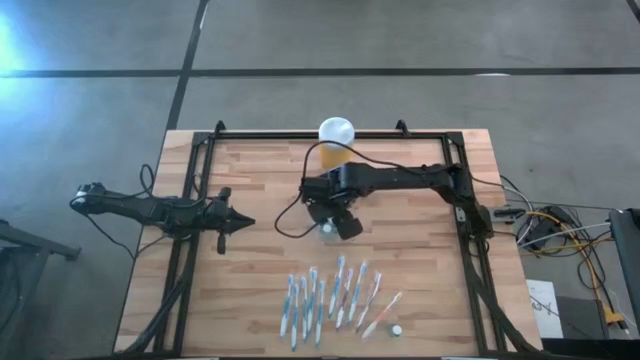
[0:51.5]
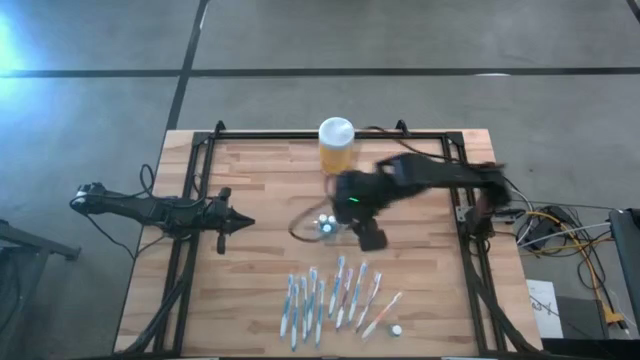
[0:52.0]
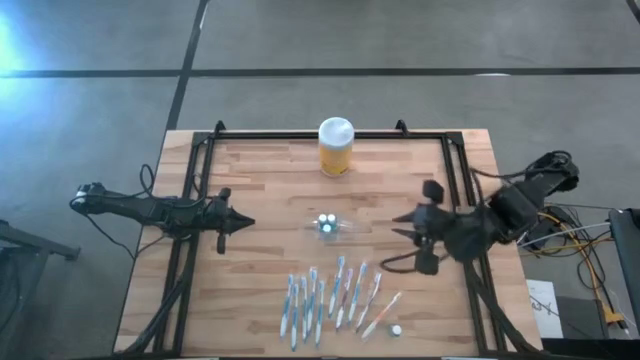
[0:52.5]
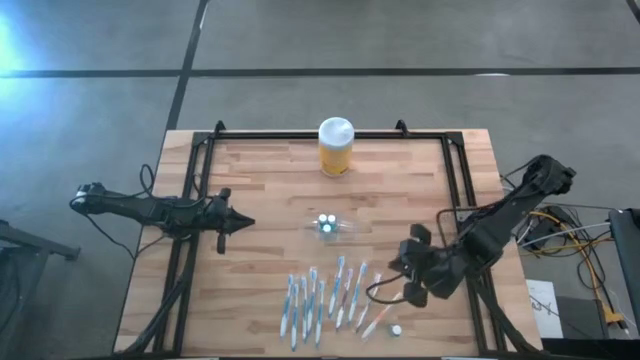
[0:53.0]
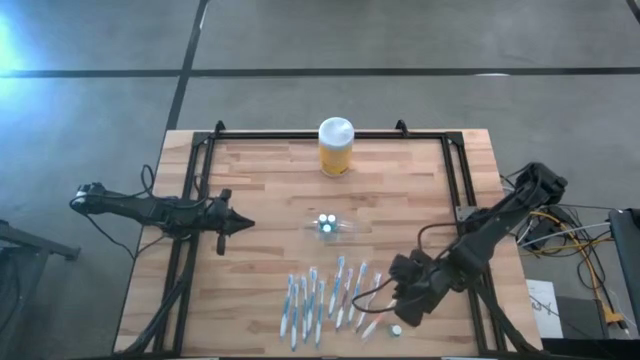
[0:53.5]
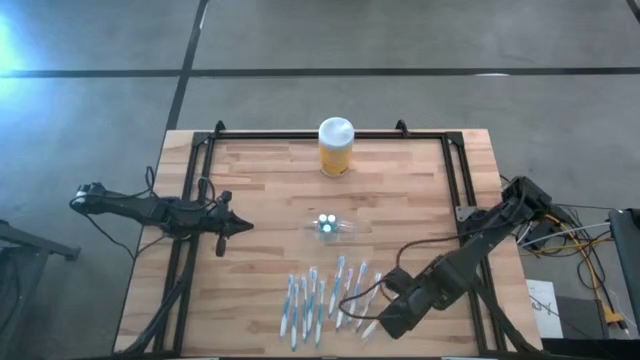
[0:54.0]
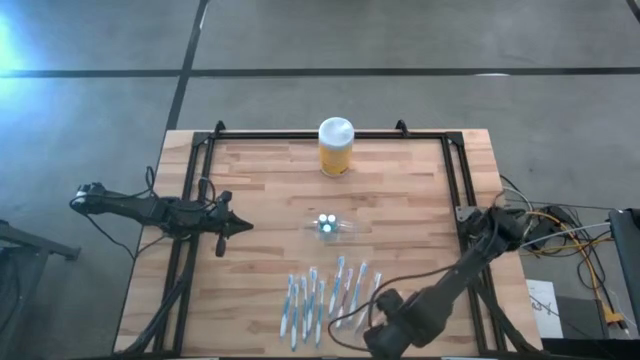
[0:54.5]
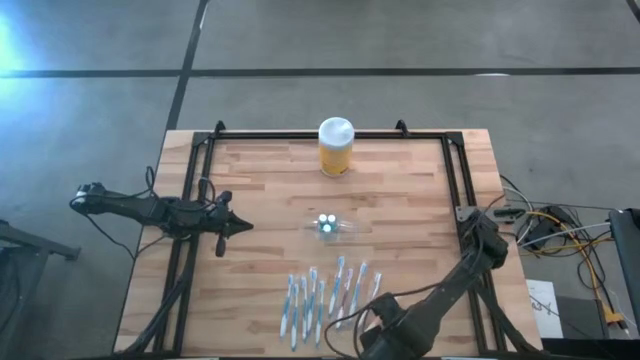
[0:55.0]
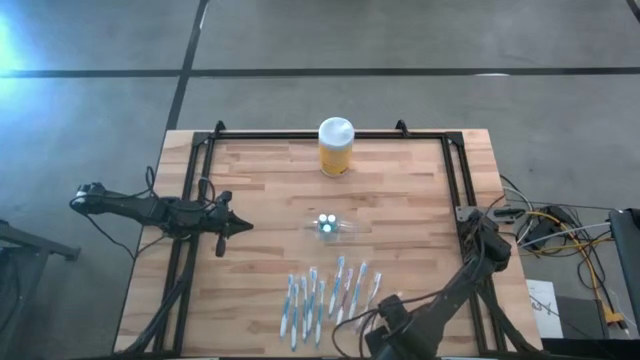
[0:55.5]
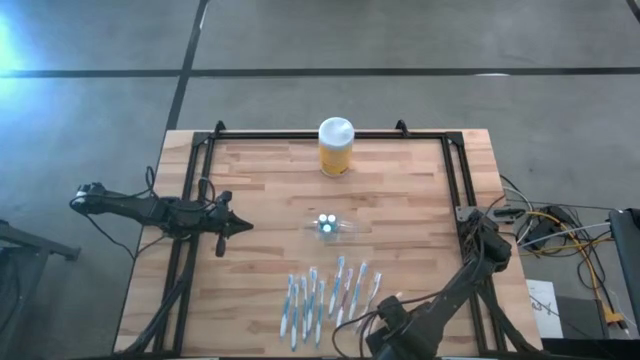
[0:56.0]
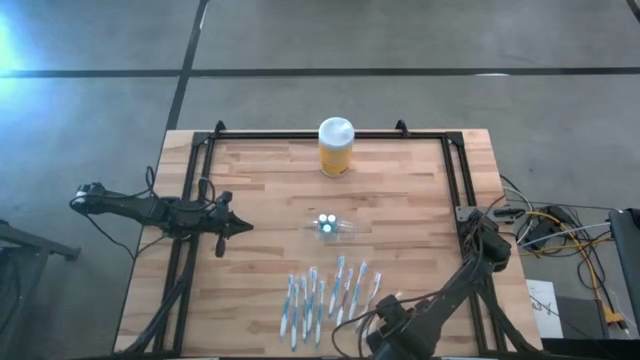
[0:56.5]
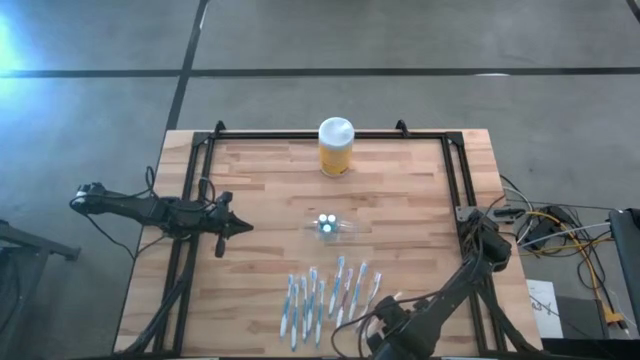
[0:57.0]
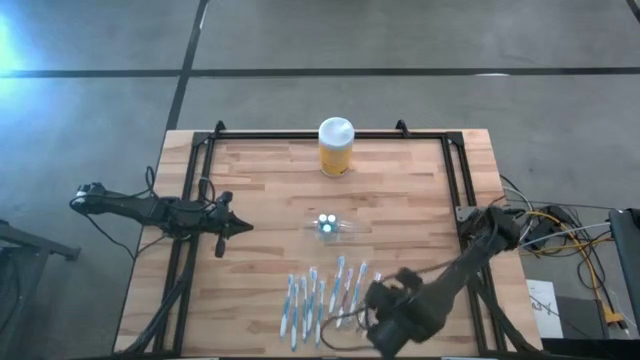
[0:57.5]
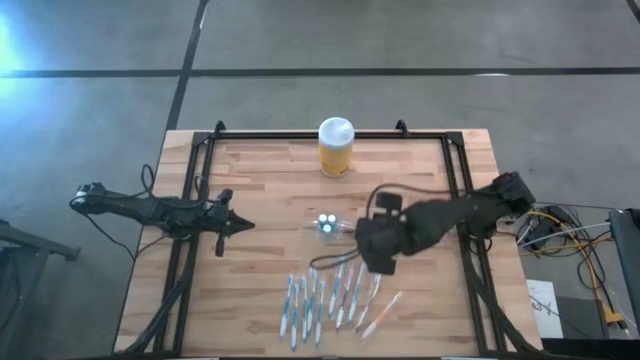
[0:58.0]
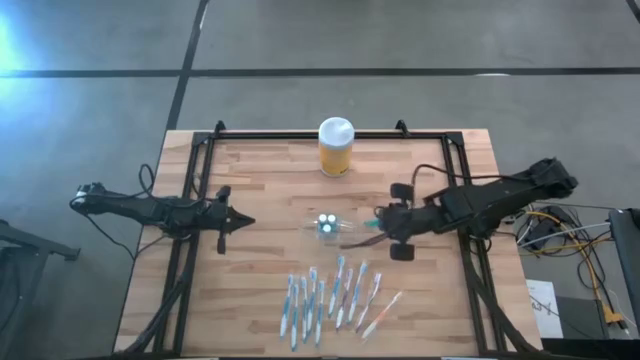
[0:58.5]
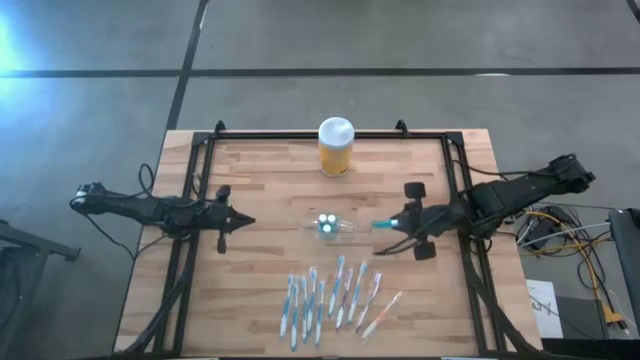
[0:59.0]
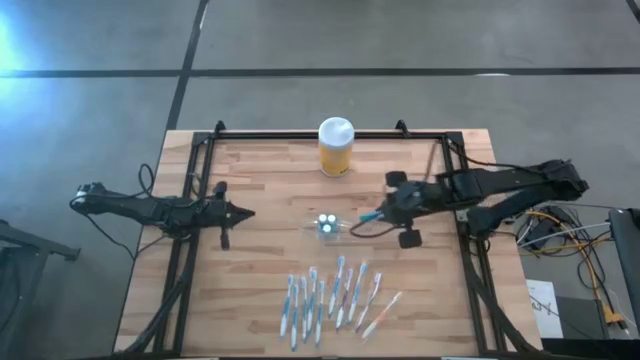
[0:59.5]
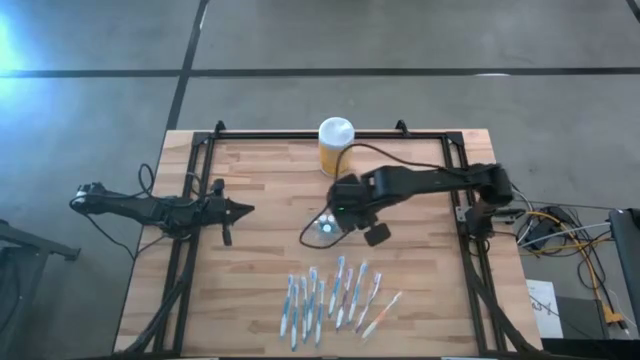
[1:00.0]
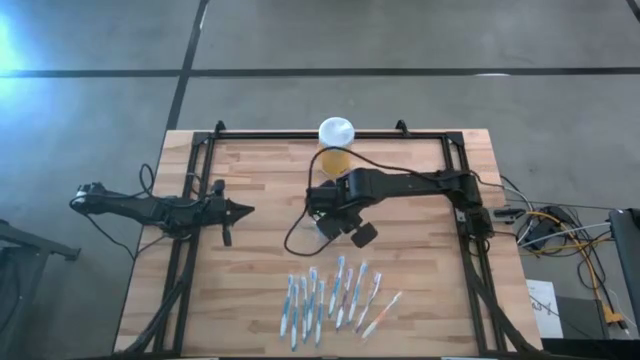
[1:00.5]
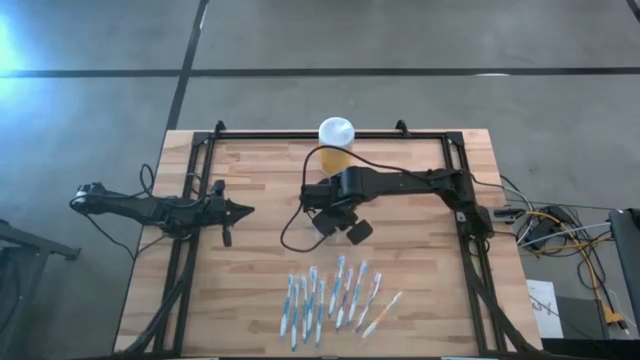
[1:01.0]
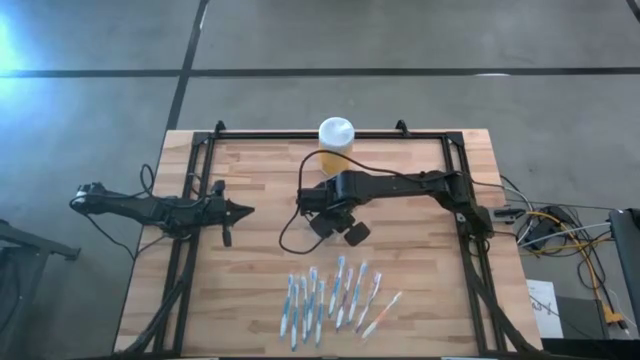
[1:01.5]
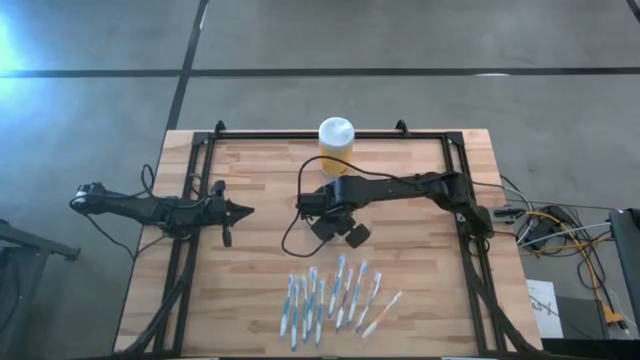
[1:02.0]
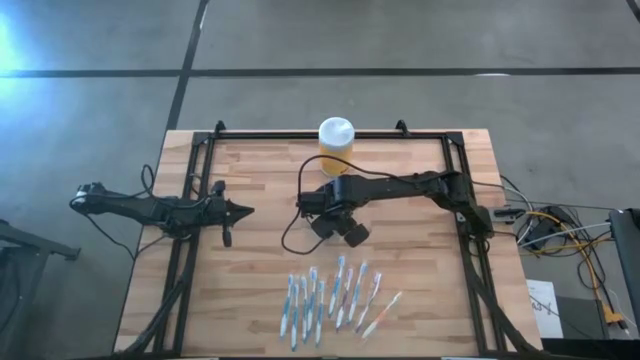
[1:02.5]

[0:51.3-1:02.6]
Task: Pick & Place toothbrushing station
Put the blue mouthwash into the transparent organizer

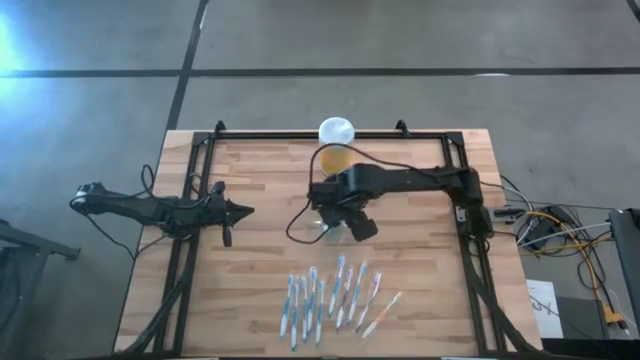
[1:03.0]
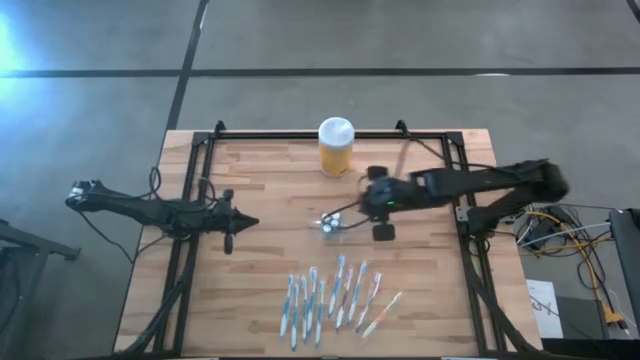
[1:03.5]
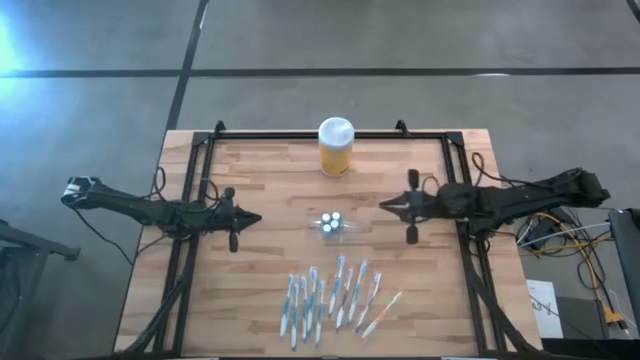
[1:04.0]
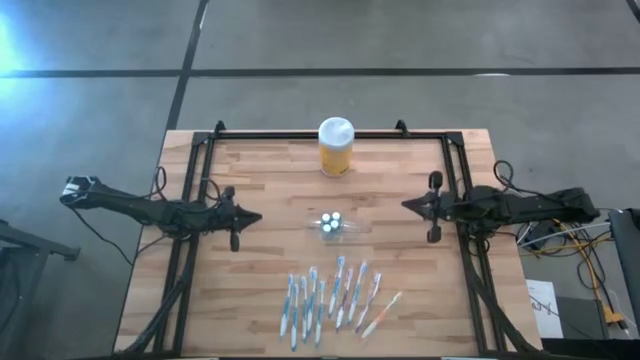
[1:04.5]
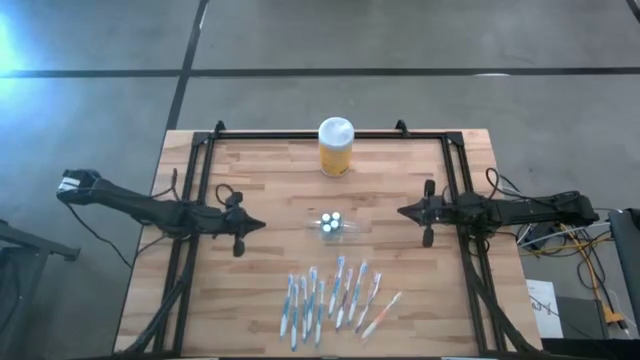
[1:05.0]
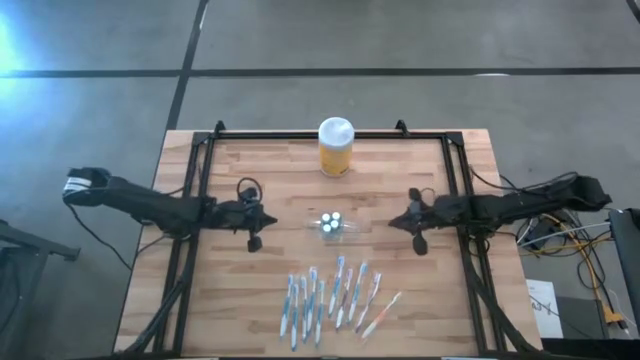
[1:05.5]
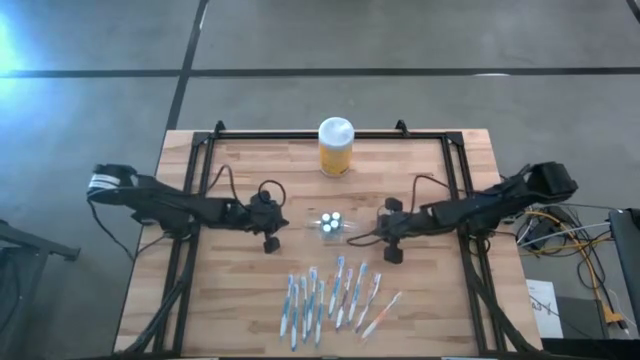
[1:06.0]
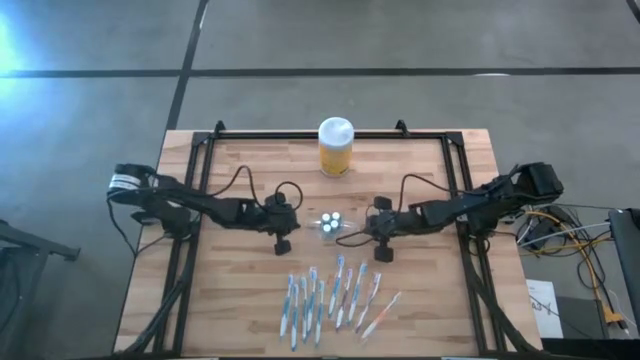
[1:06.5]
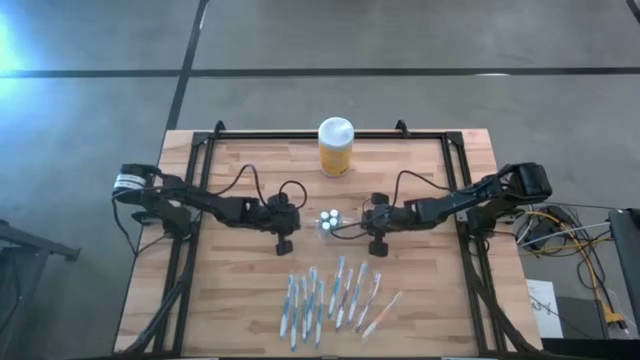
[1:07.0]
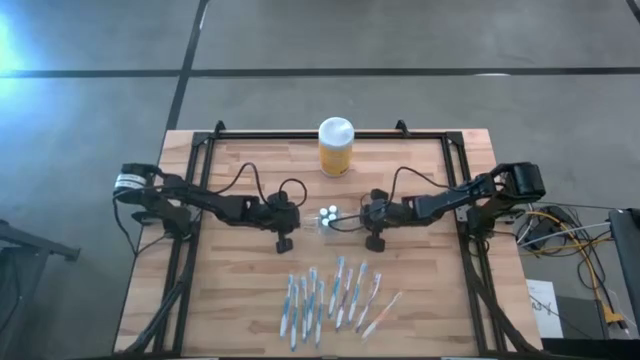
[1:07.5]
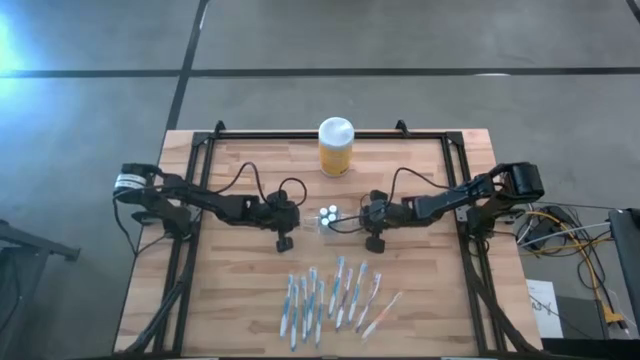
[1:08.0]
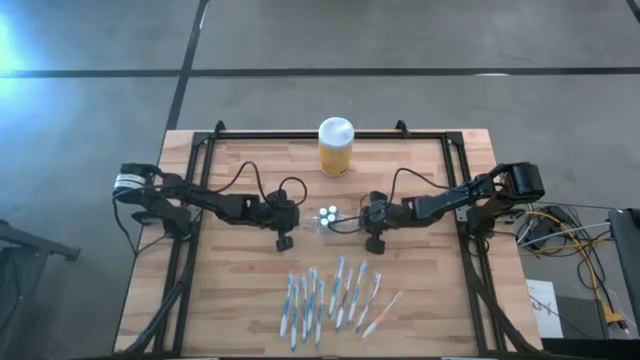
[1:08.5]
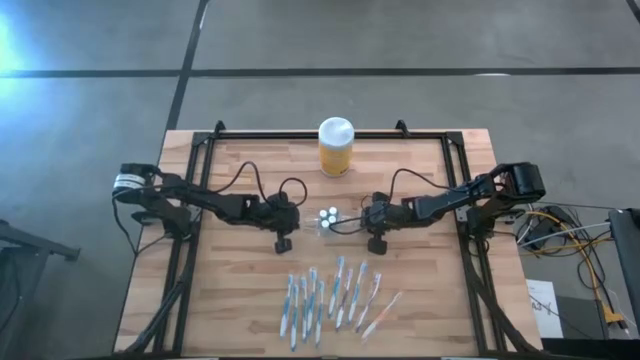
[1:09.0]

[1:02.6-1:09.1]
Adjust the transparent organizer

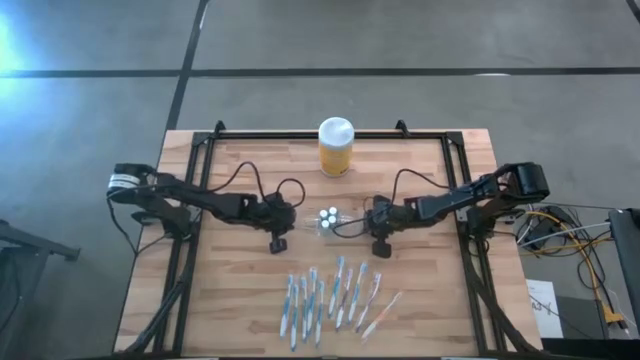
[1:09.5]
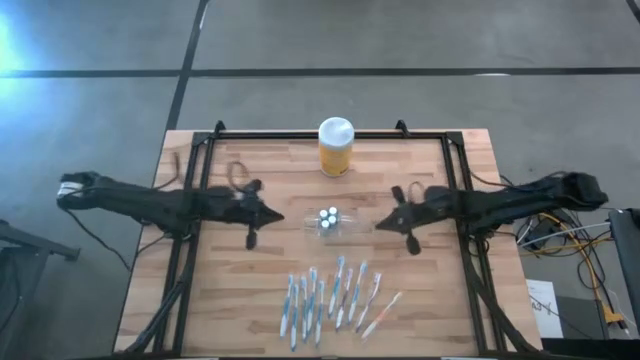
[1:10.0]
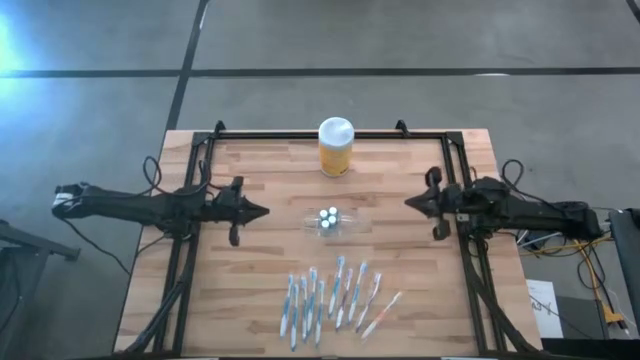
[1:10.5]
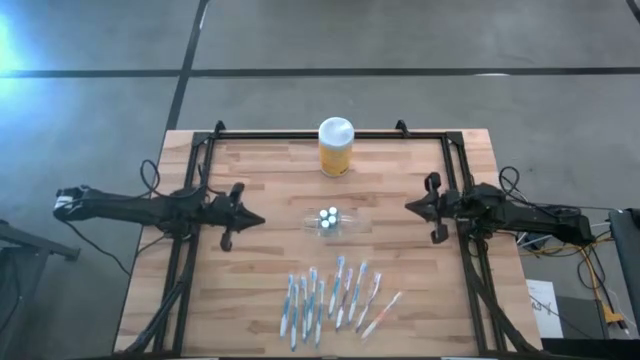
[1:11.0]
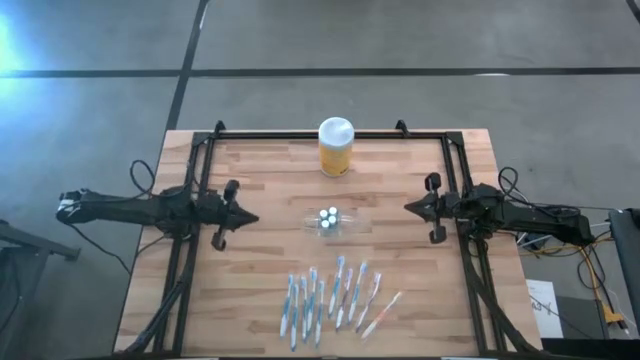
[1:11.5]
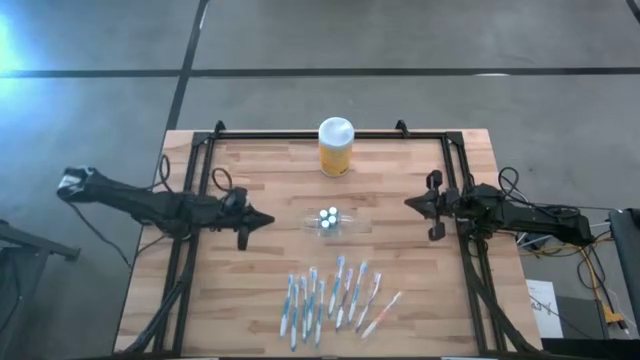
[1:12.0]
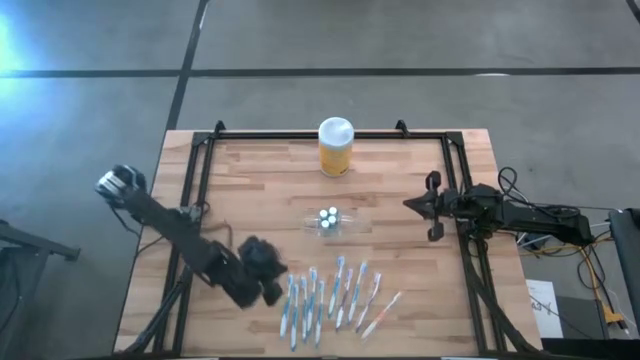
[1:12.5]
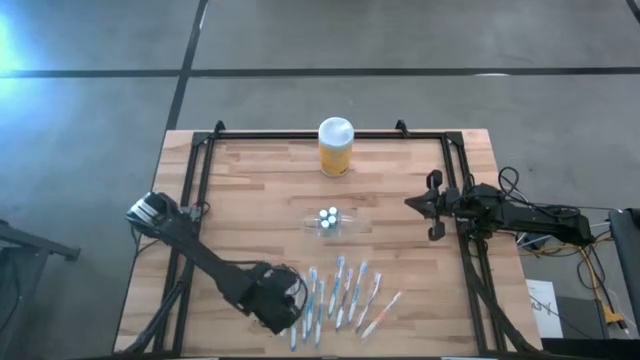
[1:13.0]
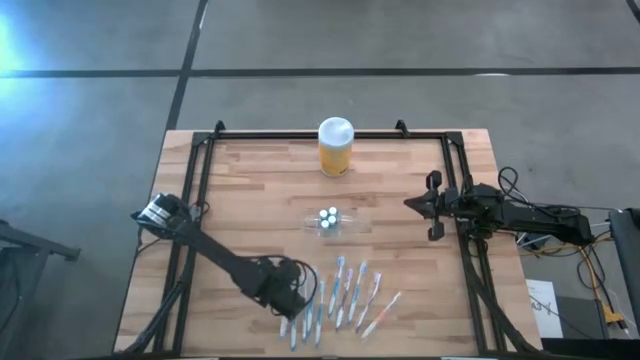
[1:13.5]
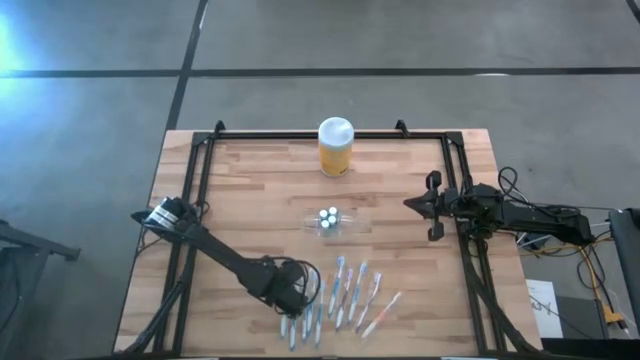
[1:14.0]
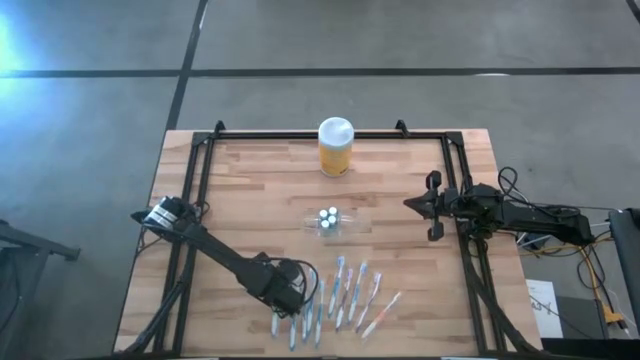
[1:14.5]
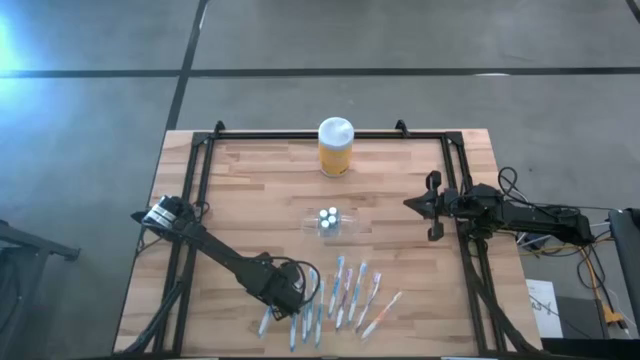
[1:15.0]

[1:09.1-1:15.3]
Put the blue toothbrush into the transparent organizer
